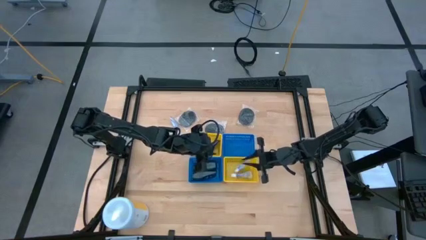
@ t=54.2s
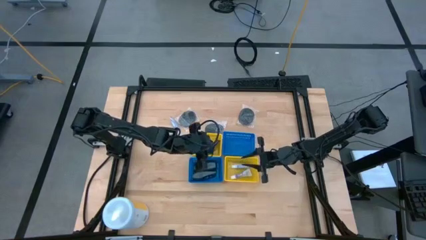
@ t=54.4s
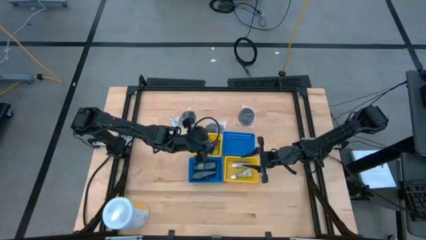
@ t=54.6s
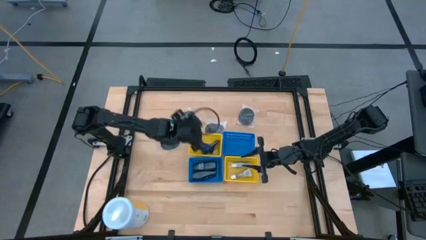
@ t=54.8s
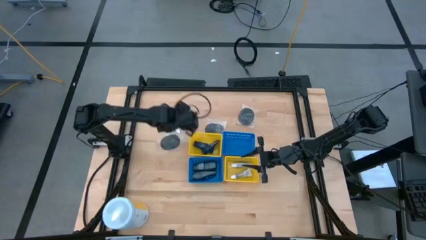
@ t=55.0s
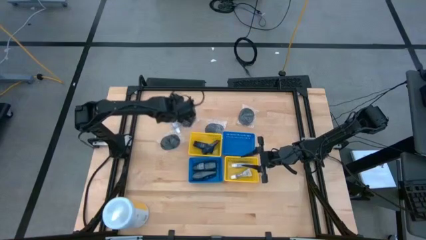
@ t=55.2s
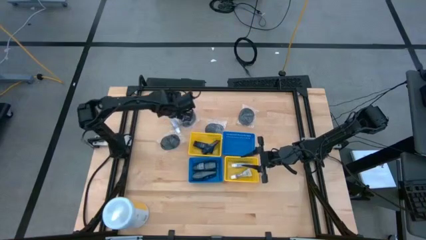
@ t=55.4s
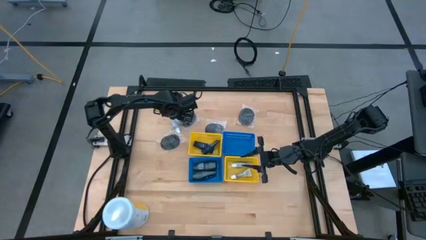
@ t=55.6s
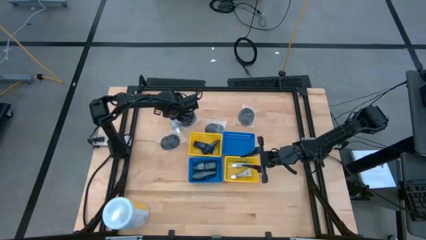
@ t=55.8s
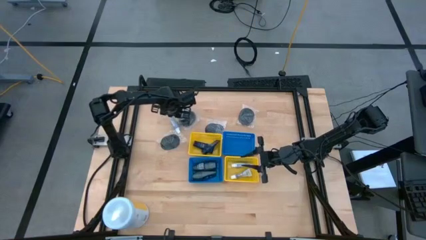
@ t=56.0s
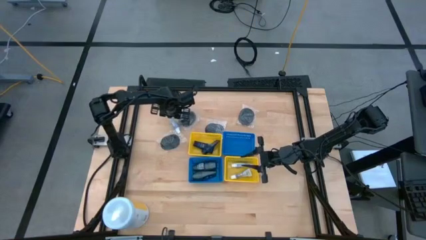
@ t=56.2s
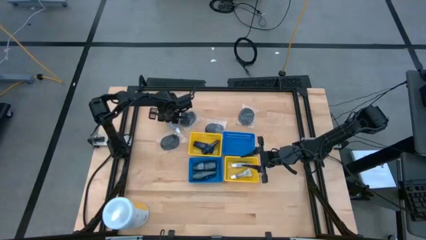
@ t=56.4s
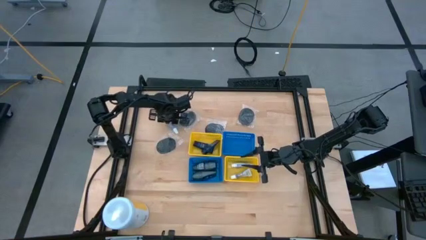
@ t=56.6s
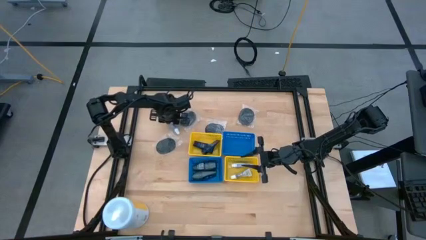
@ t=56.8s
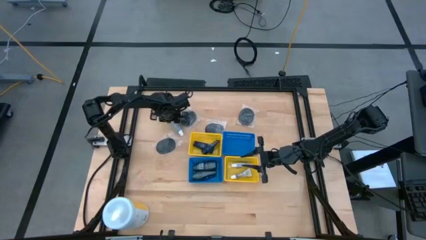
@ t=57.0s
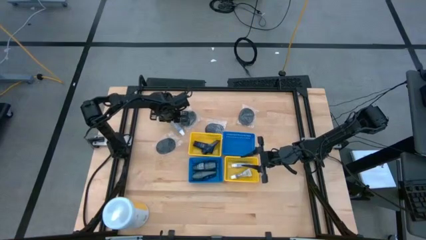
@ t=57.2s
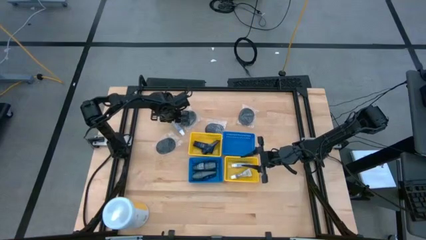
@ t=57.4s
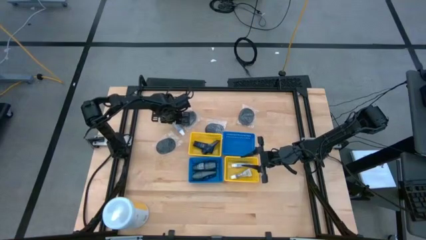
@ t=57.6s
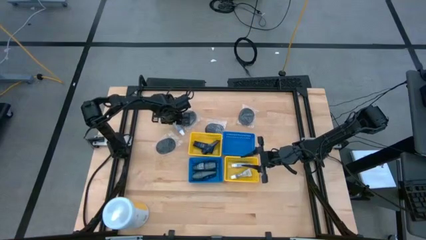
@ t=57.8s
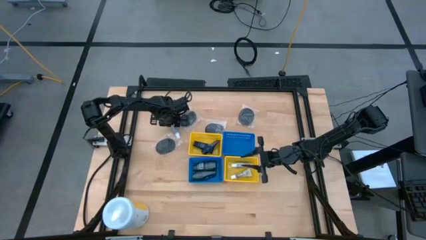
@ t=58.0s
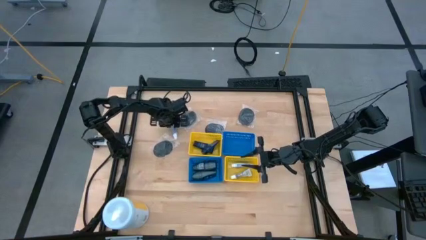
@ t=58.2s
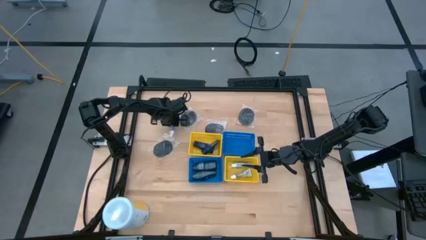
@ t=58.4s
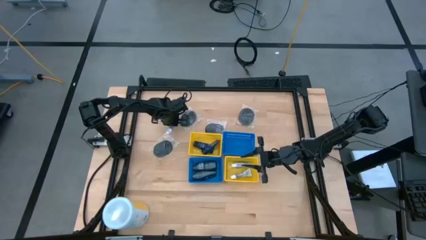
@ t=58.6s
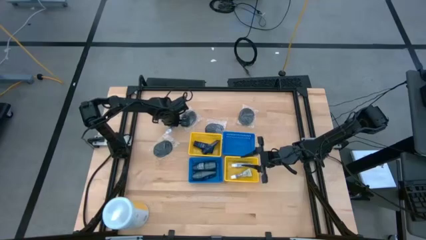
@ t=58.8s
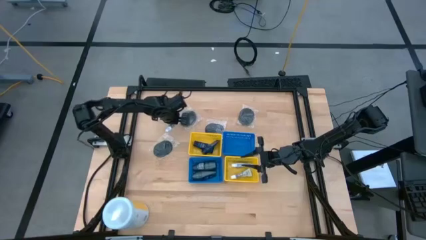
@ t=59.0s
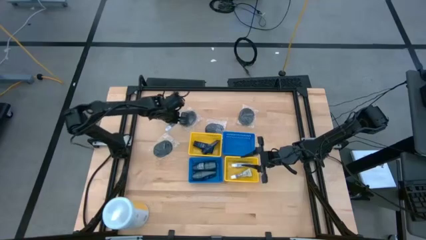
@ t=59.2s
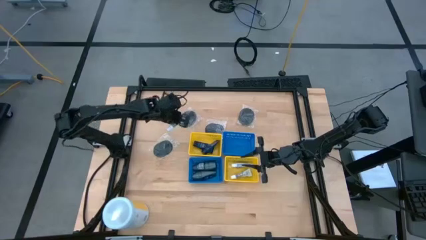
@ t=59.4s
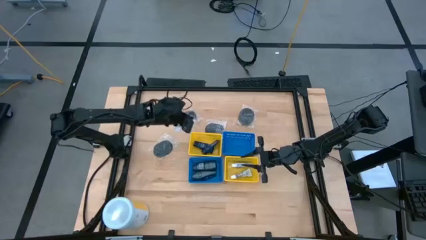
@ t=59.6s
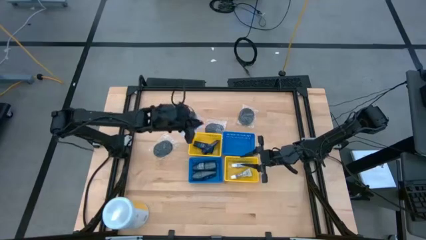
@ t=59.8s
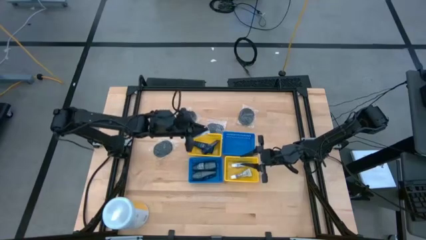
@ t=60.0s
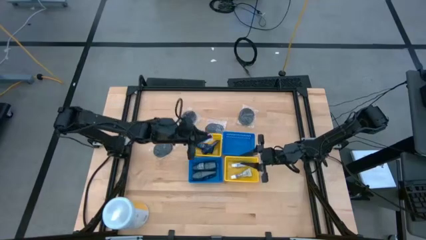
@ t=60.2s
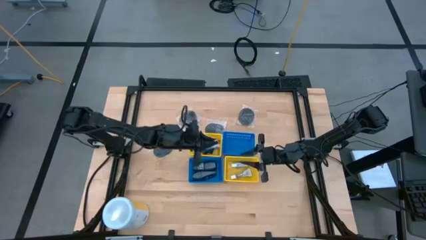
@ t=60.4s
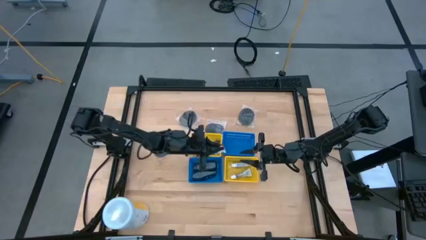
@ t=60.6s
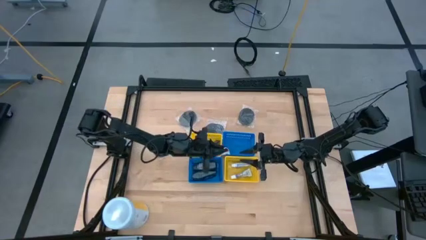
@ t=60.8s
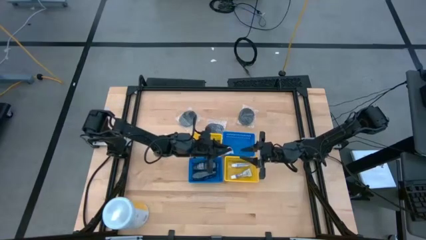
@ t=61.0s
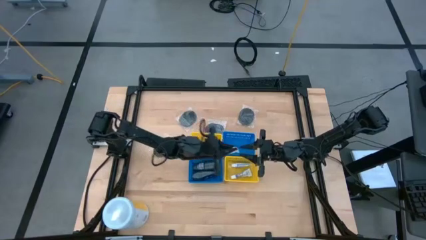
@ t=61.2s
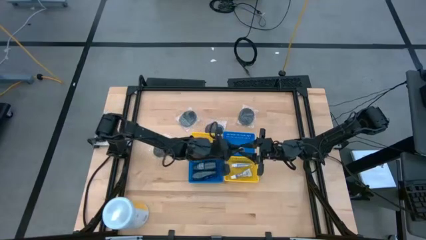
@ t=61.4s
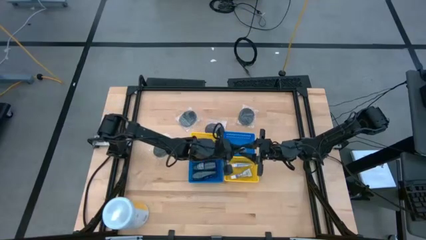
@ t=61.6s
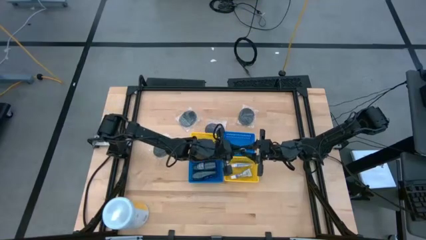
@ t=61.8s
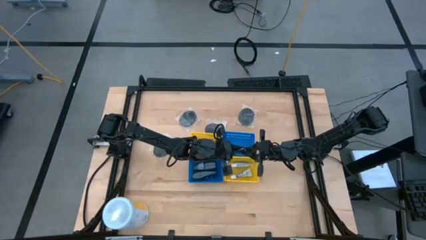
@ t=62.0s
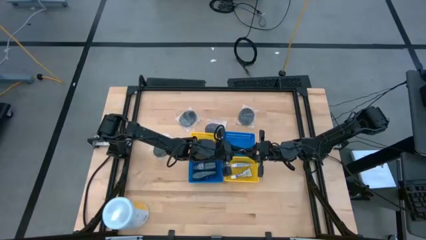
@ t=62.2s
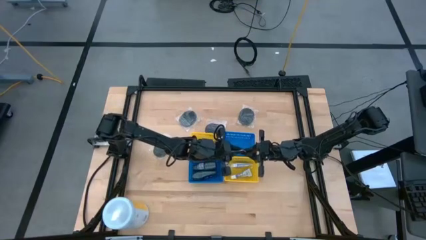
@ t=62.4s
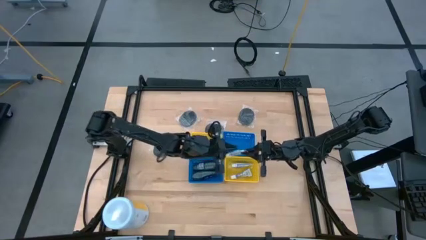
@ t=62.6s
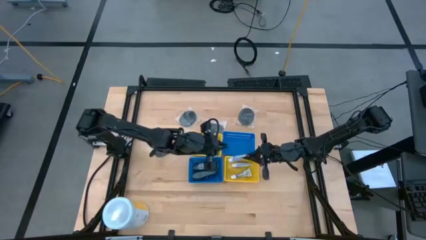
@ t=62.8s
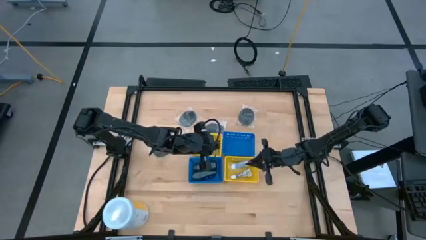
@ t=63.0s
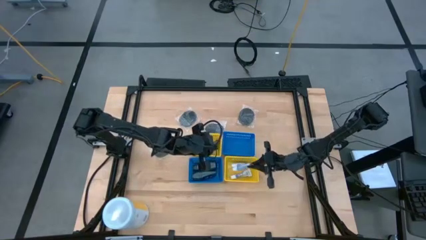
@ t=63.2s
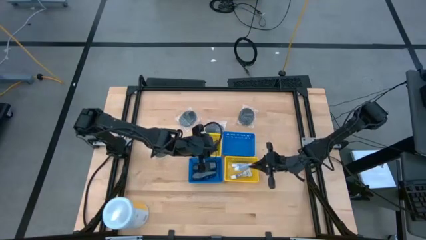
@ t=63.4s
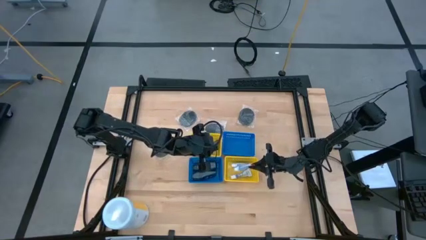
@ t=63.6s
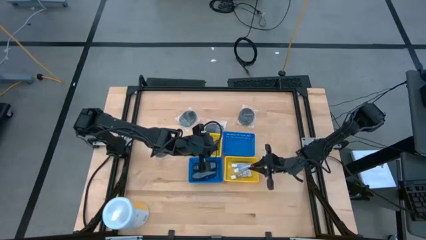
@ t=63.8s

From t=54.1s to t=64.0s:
Task: Pick & Place Travel size toiletries
Put the white toothpaste into the right yellow bin

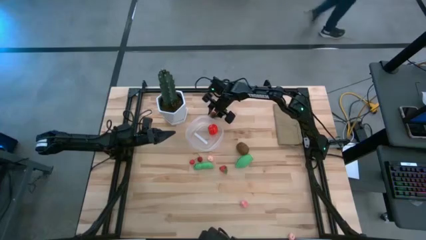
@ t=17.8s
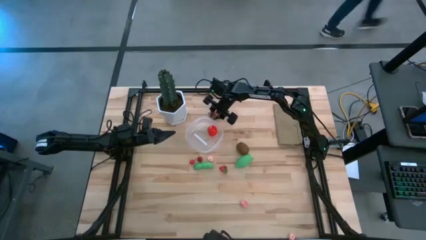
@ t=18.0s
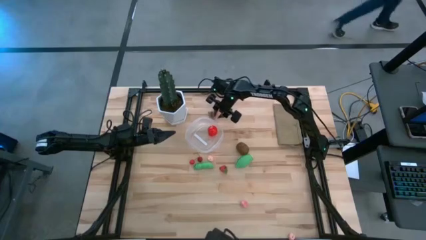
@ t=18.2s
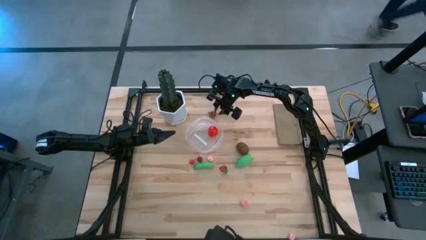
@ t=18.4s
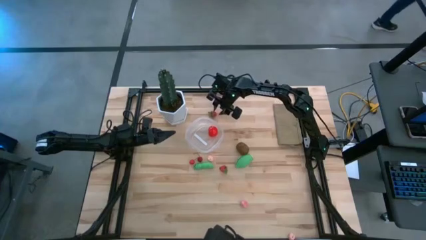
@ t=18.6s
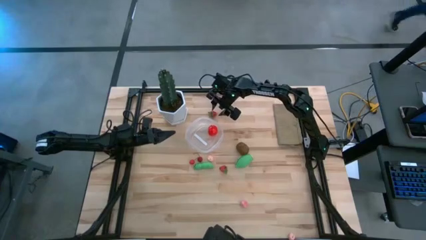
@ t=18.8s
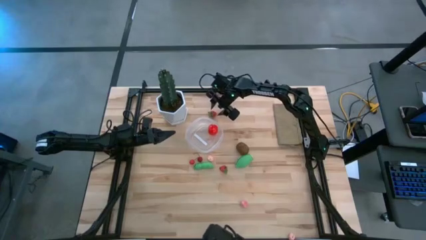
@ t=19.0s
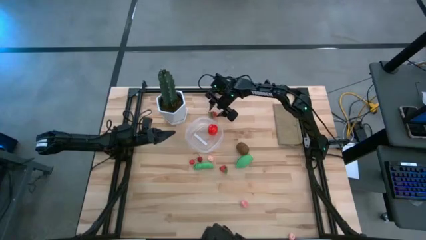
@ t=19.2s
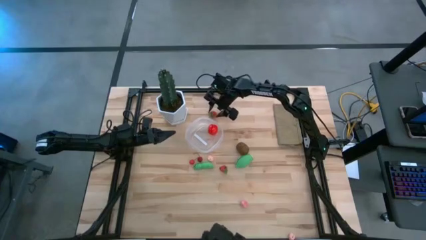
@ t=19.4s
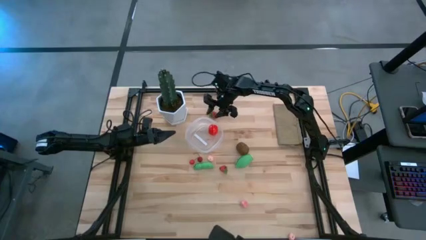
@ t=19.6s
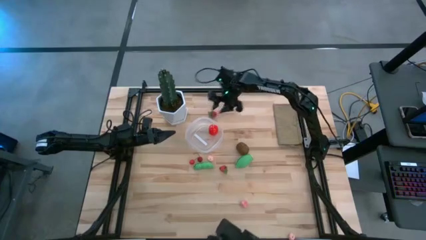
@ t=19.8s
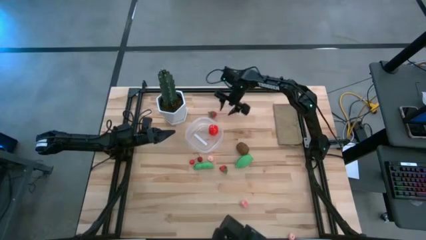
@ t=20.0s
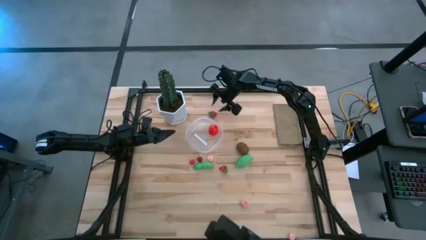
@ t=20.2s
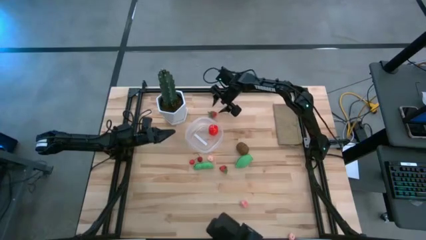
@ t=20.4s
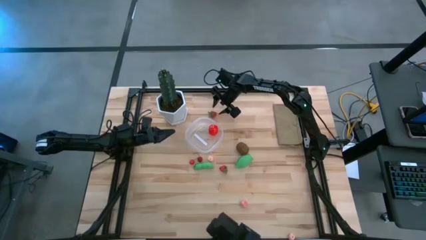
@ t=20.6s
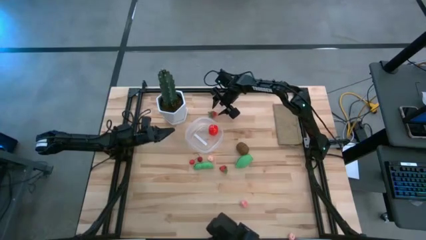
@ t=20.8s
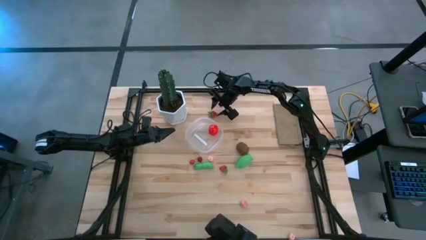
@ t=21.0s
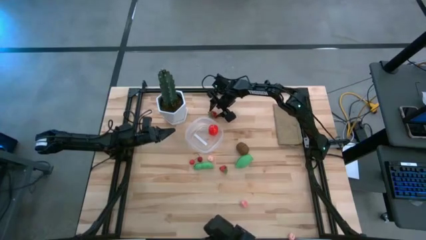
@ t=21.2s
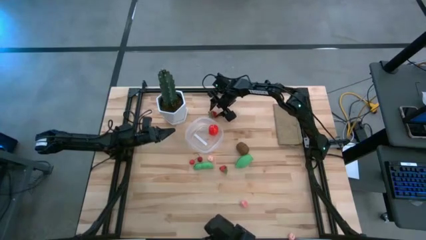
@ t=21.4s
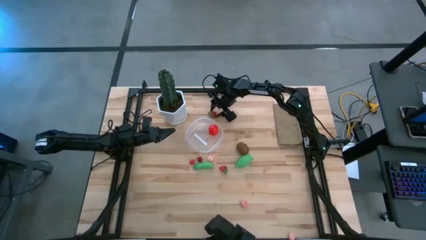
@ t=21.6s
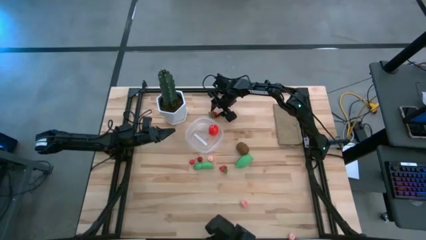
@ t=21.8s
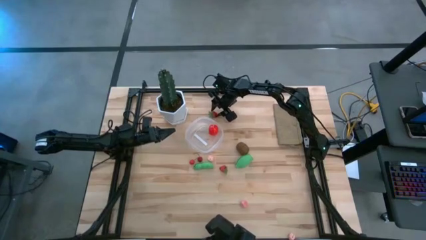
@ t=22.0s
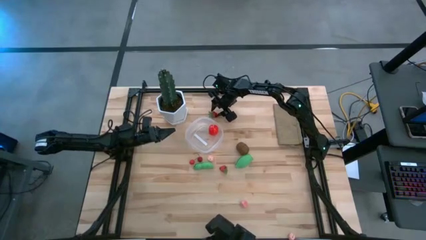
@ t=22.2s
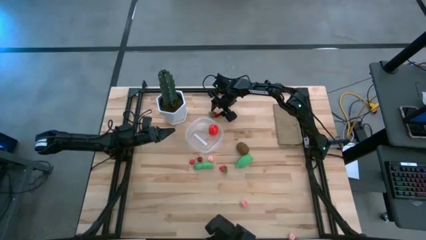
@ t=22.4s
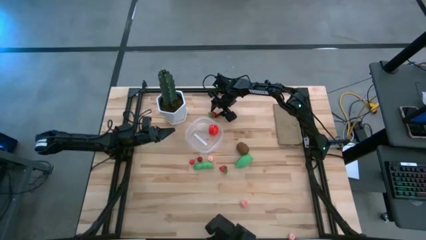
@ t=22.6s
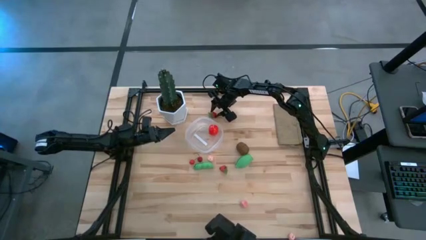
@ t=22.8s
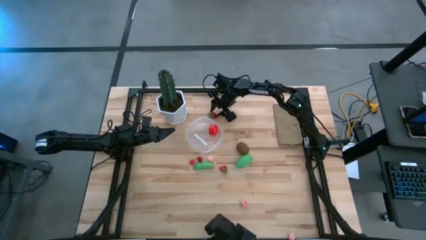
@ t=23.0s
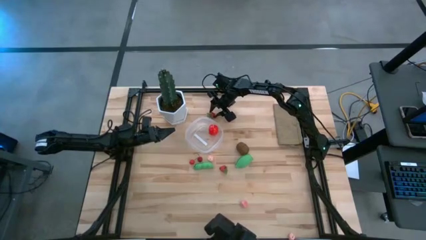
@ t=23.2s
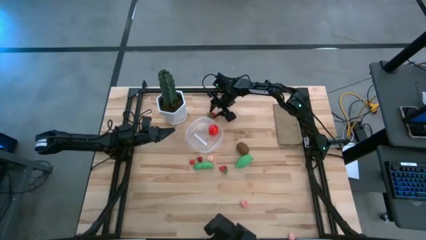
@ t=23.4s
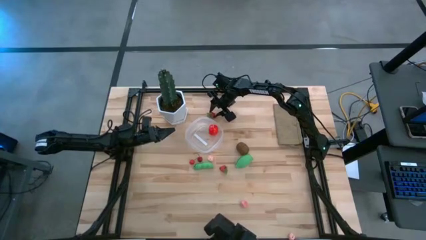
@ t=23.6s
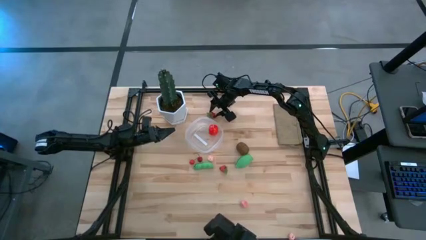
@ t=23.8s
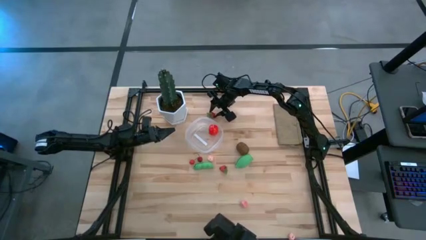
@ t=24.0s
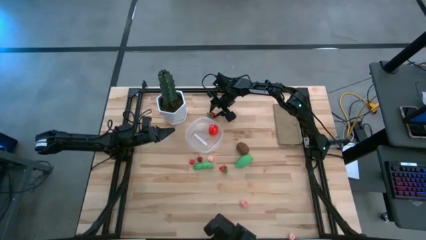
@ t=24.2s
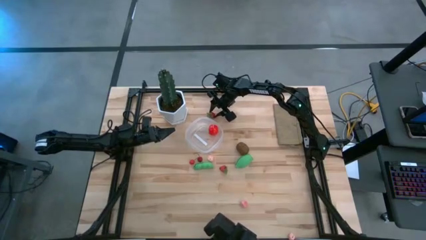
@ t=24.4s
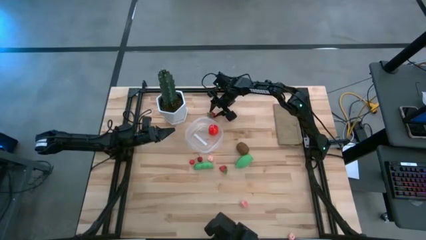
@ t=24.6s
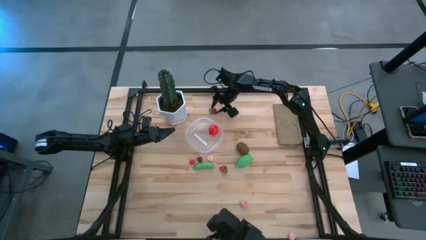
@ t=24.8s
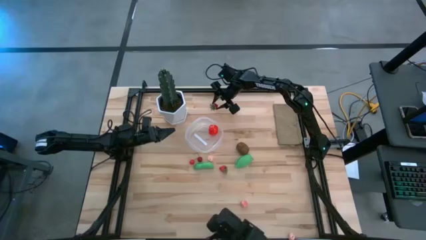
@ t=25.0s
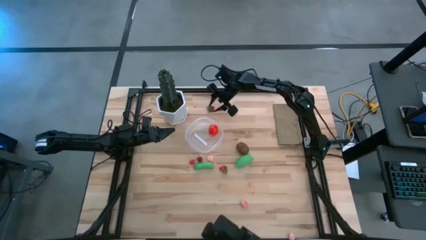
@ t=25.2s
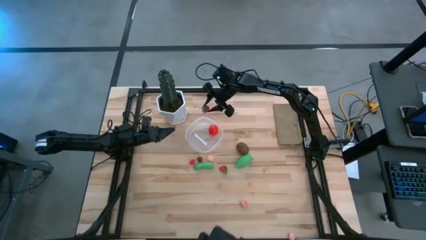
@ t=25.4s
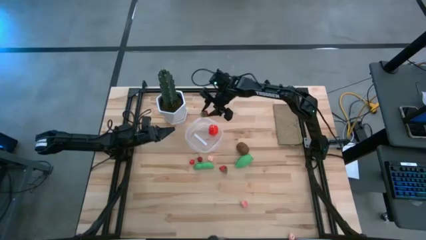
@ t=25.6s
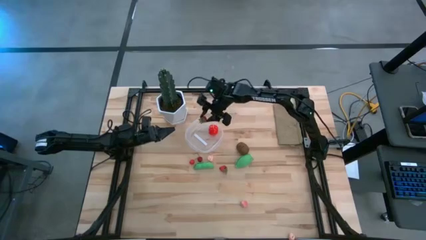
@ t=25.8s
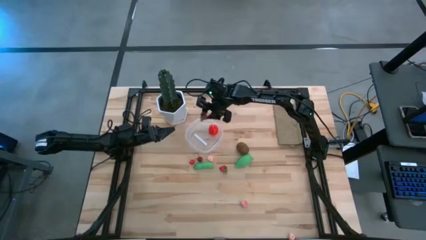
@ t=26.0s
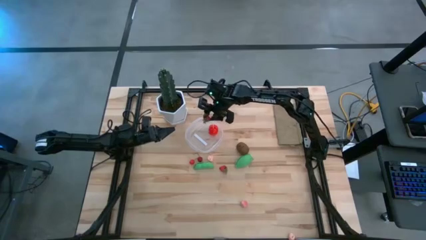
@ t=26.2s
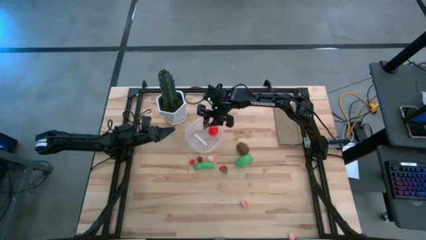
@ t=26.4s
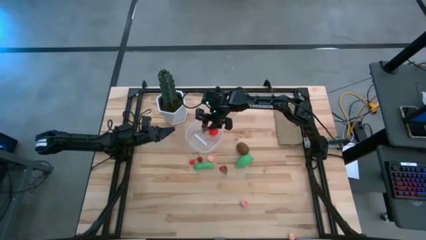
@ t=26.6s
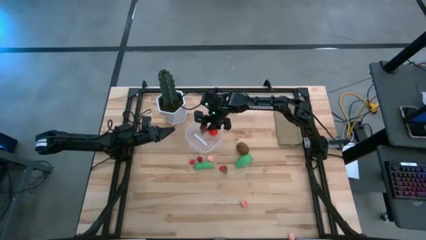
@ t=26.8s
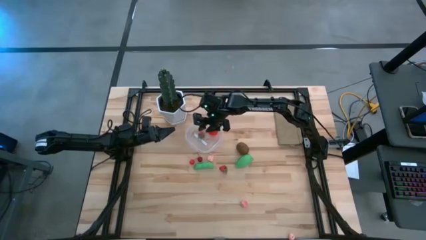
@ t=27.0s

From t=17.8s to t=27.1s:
Task: Pick and placing Produce into tupperware
Put the top strawberry into the transparent bin
